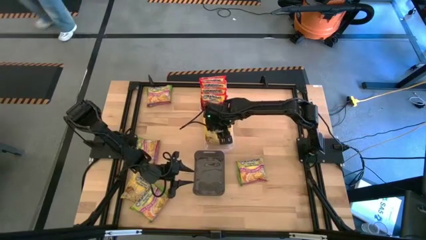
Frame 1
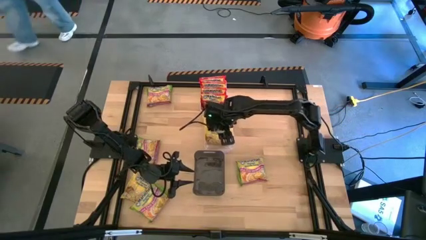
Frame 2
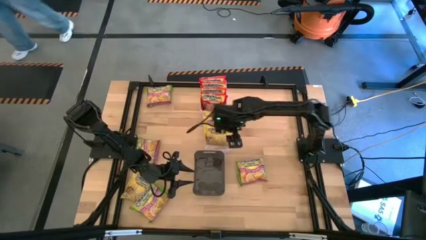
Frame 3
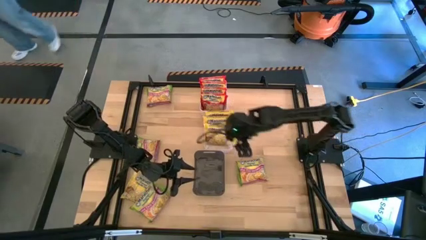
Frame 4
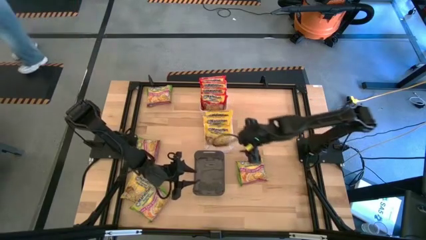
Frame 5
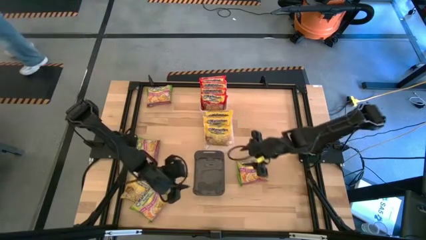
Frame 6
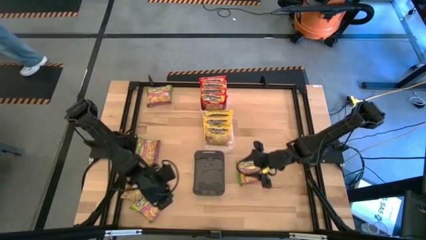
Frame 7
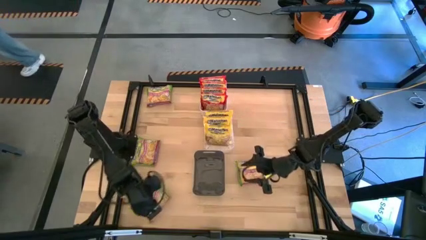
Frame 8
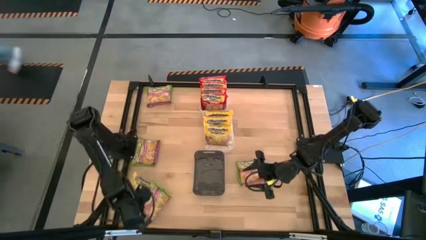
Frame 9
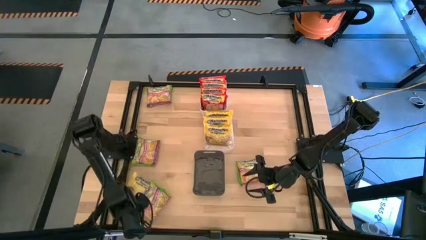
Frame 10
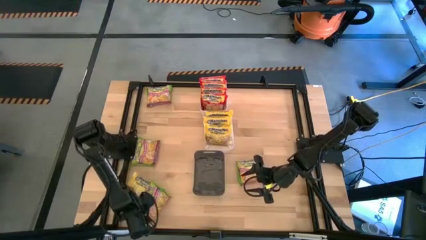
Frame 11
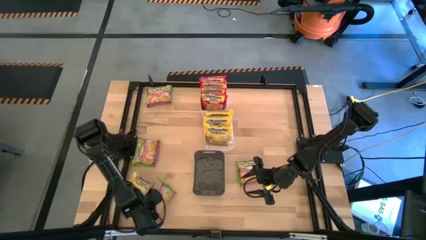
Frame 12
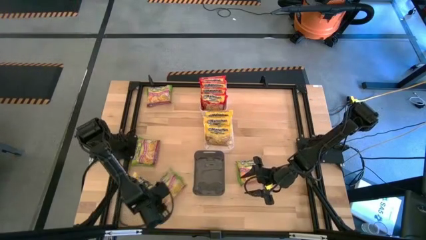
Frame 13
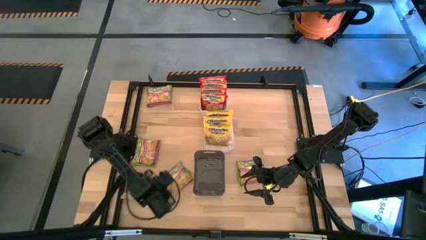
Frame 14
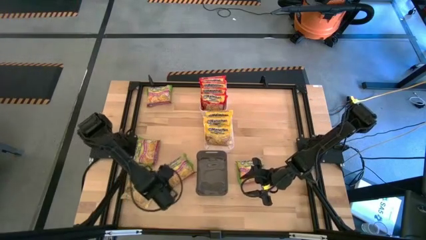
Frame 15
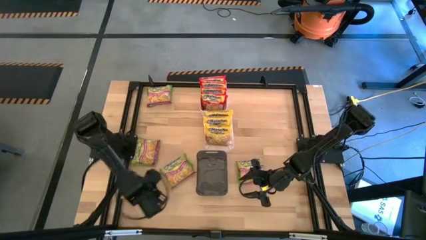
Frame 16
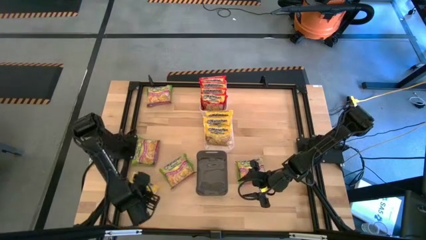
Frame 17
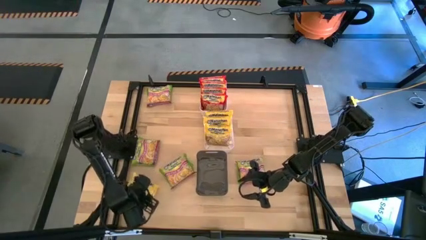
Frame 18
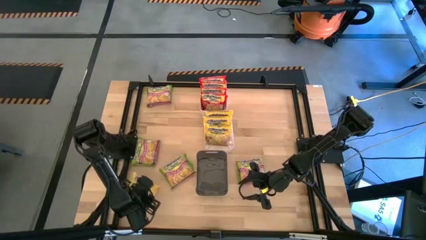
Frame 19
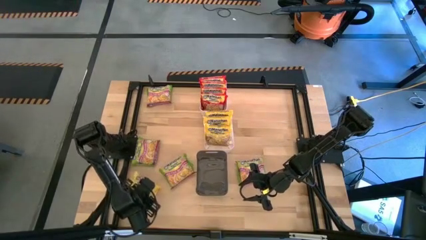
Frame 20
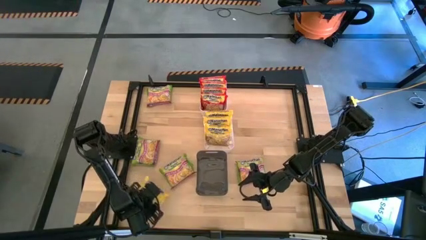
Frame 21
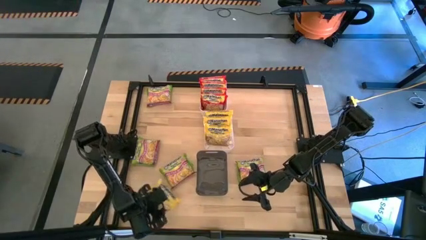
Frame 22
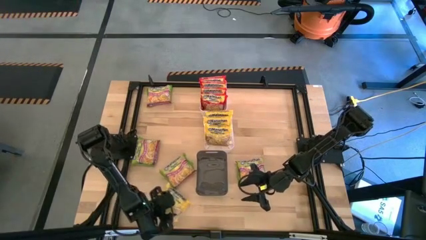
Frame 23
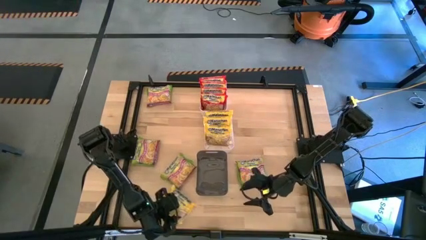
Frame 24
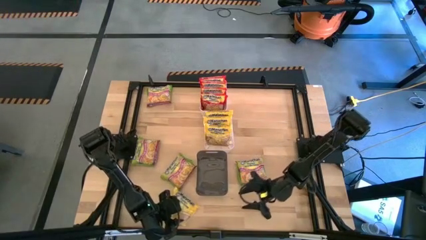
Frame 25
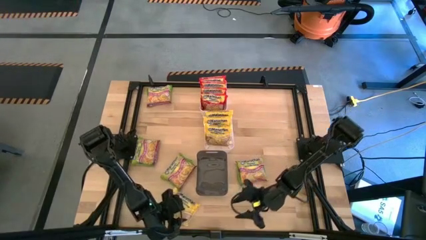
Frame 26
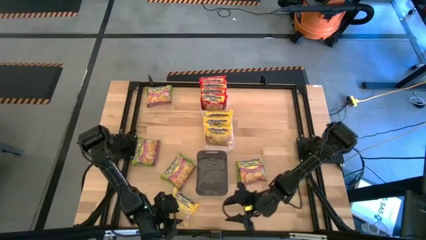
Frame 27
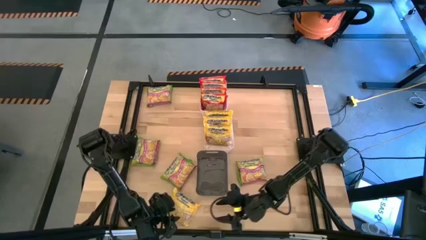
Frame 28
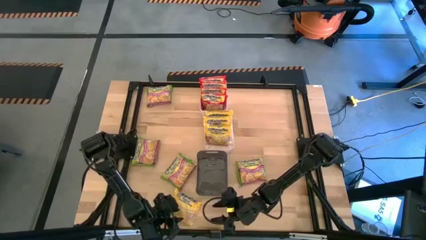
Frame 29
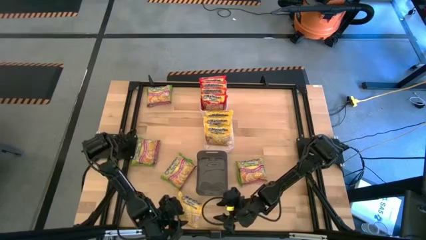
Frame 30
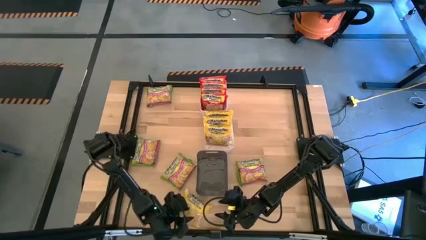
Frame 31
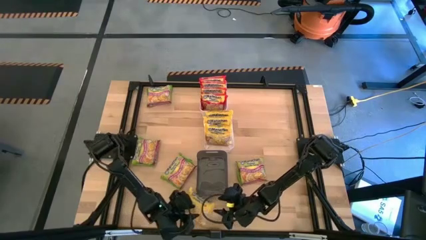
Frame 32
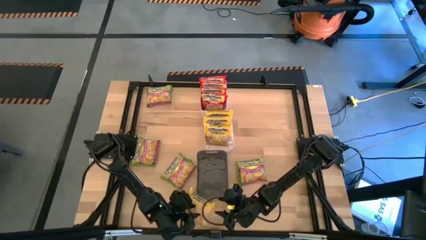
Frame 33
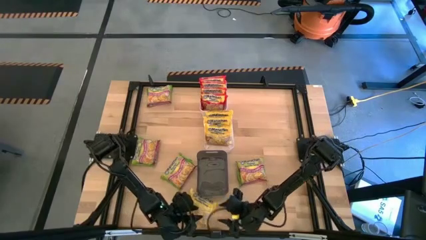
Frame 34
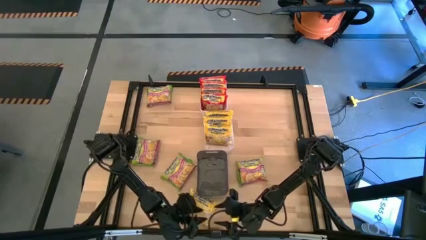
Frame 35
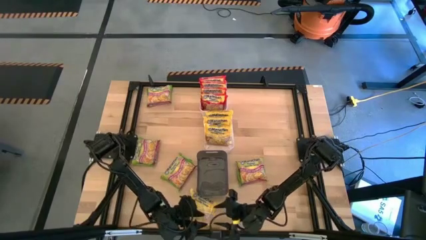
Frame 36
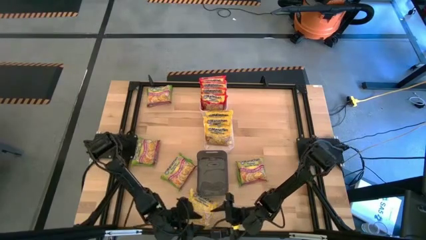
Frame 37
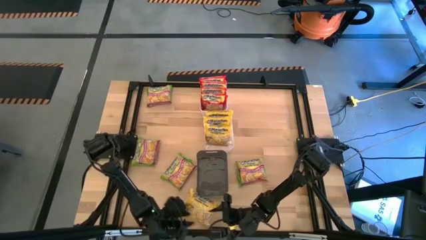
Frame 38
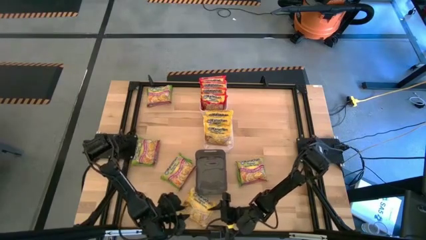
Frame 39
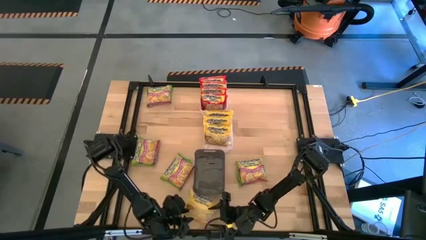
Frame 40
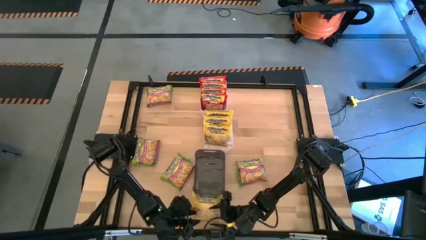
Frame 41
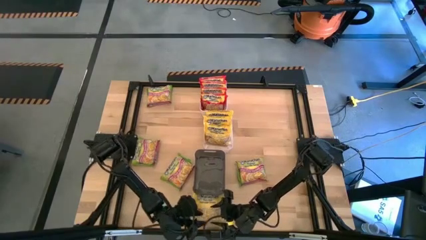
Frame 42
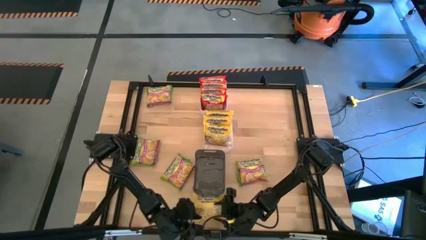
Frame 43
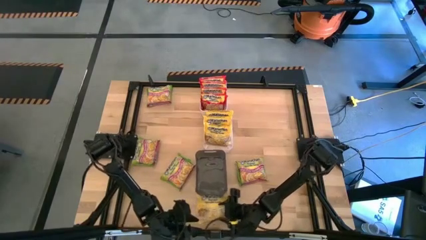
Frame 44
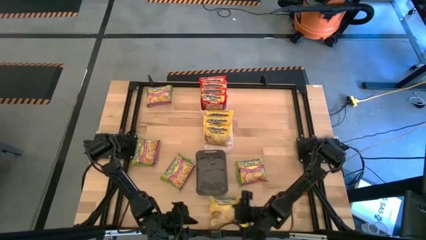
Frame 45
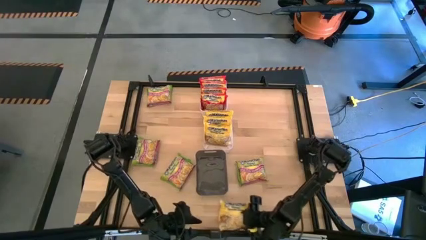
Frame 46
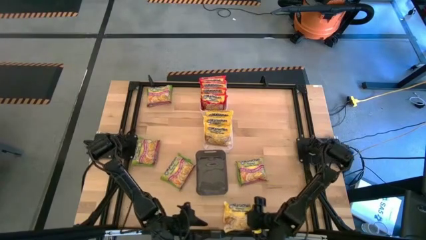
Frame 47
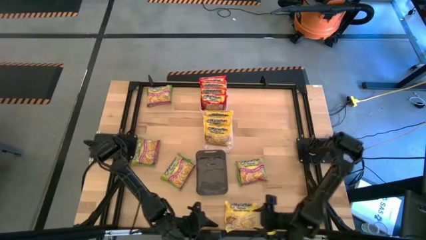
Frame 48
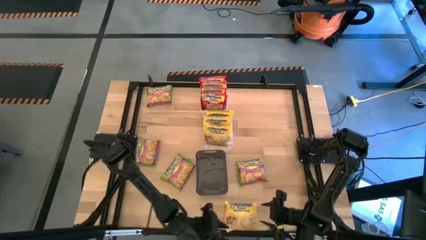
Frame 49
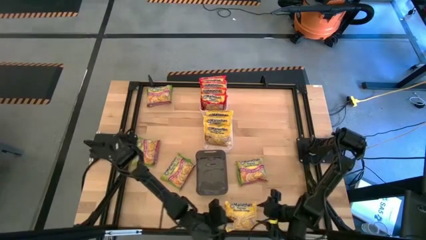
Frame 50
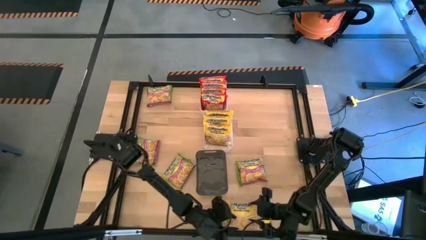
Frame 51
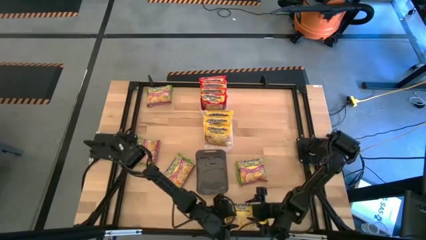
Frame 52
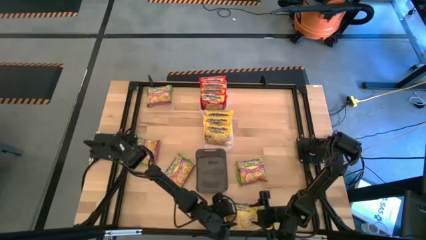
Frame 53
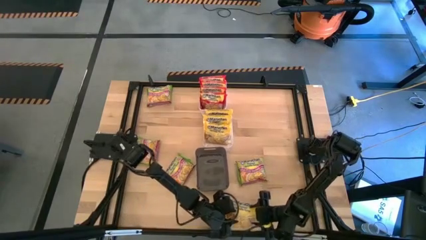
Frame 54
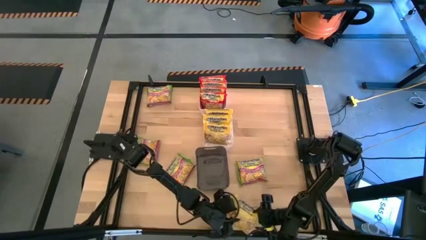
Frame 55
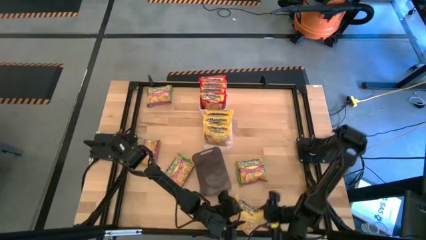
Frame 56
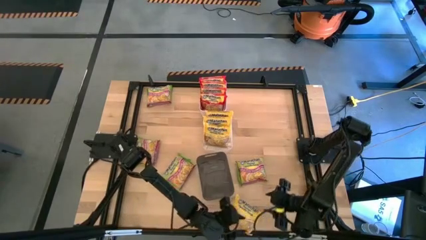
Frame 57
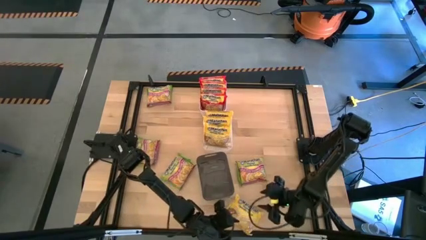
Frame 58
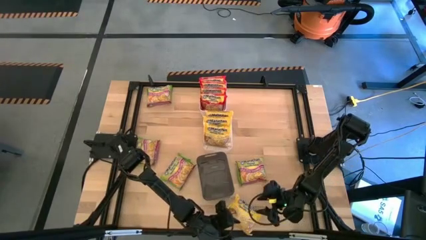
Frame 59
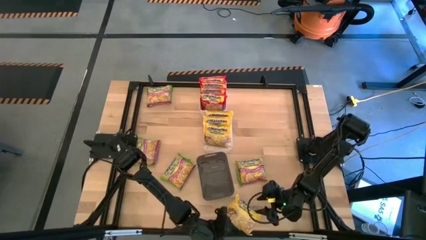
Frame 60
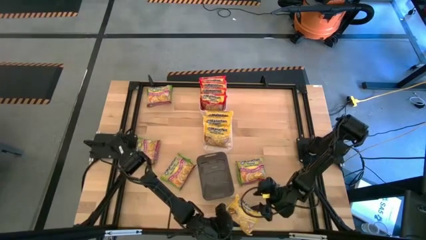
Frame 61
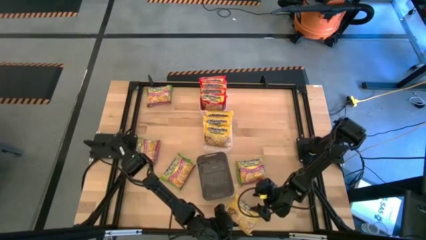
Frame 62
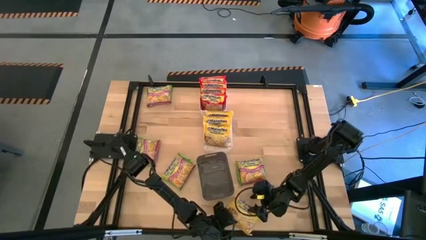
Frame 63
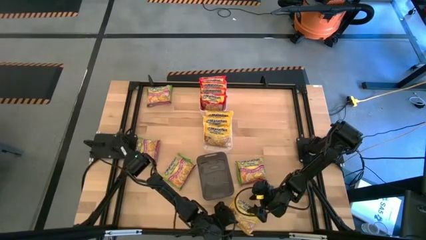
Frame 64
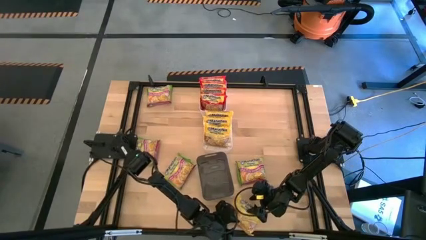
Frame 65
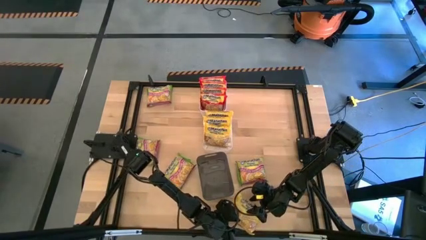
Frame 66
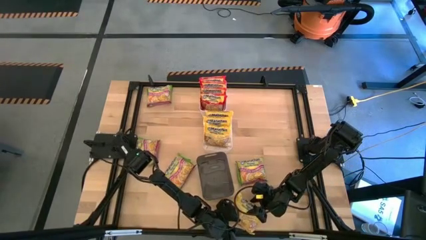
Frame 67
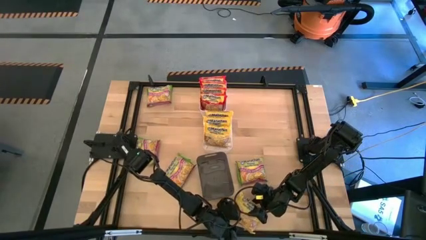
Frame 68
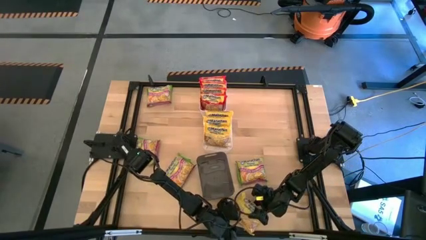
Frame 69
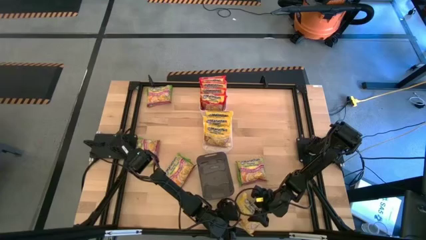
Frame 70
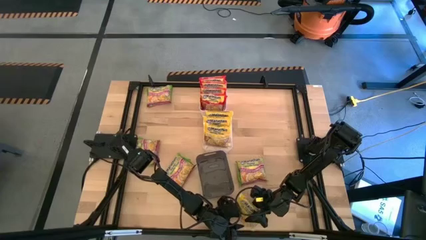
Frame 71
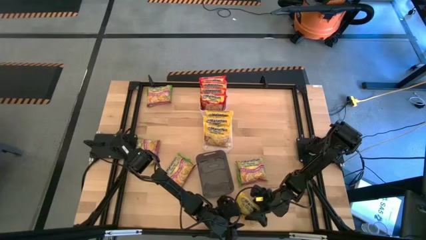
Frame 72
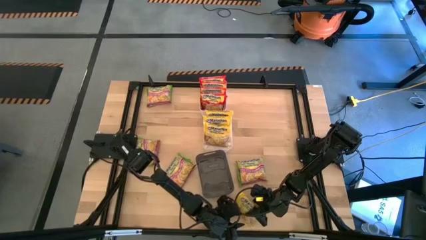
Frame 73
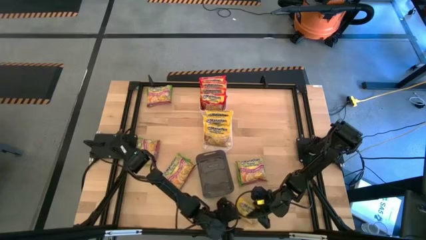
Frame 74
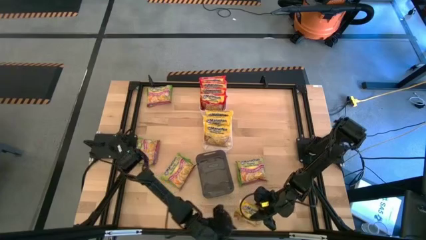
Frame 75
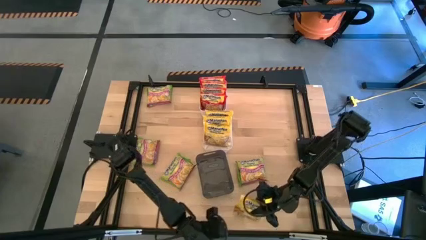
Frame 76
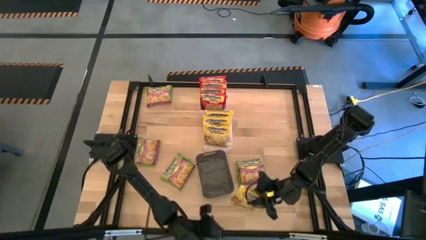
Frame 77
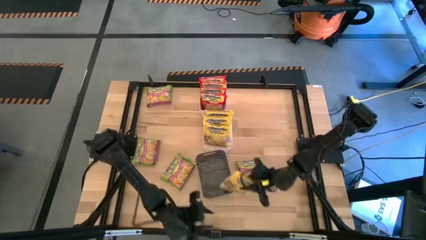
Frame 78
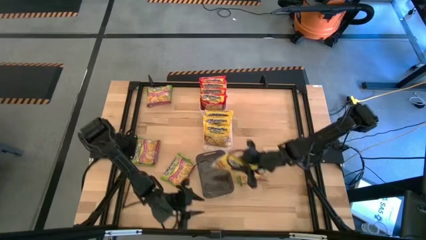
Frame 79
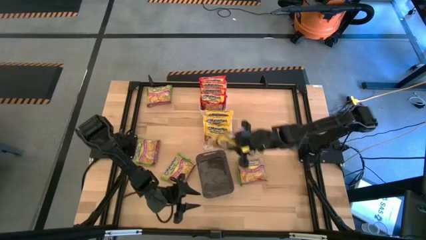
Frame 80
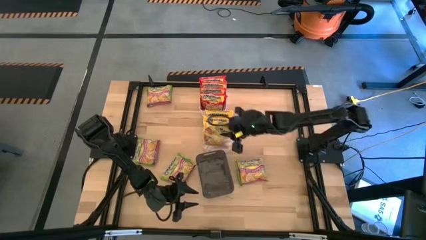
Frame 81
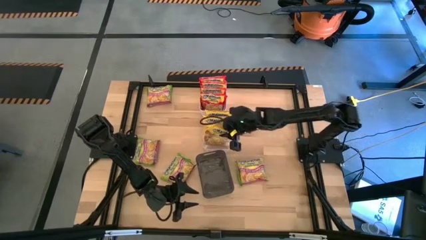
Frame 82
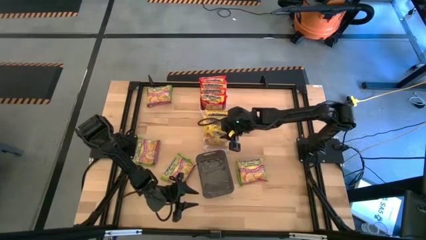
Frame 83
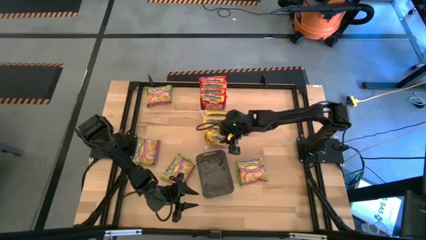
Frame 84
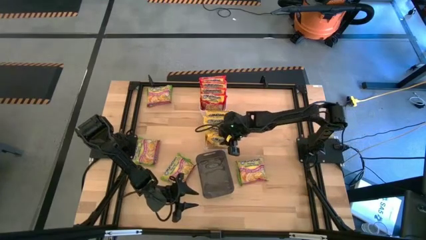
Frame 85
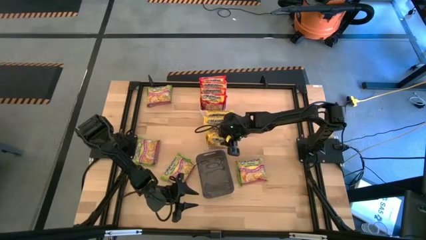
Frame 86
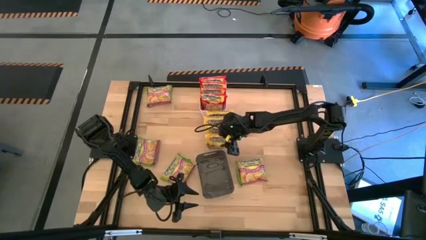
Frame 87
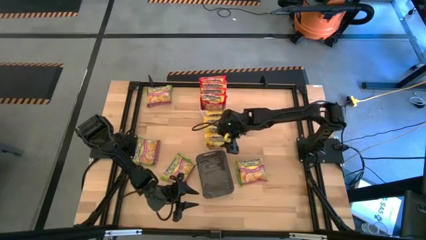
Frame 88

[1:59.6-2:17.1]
Task: Sort Maruchan noodles
Put the yellow noodle pack into the transparent bin
